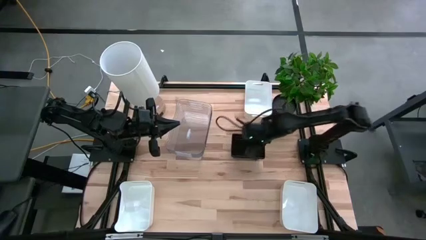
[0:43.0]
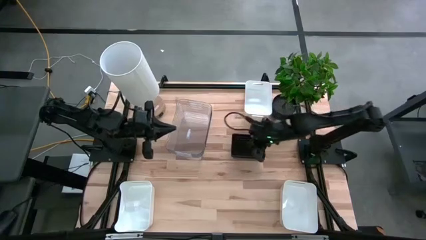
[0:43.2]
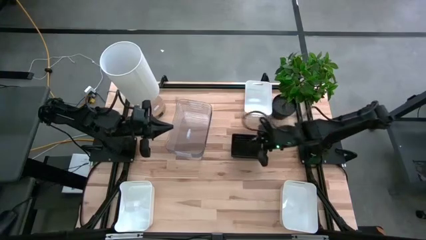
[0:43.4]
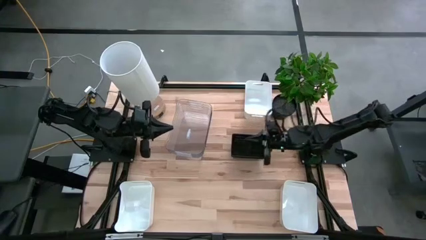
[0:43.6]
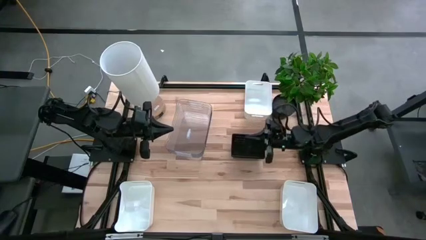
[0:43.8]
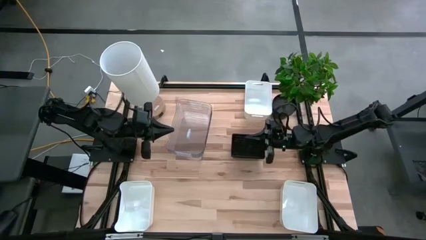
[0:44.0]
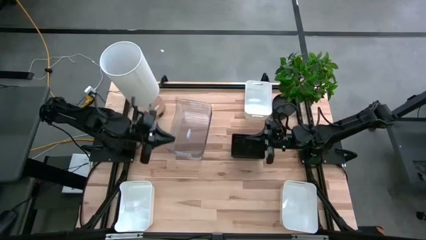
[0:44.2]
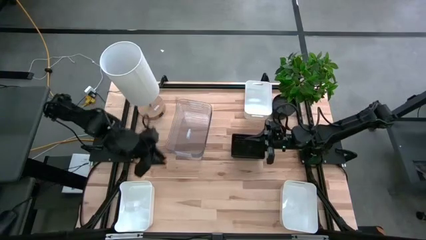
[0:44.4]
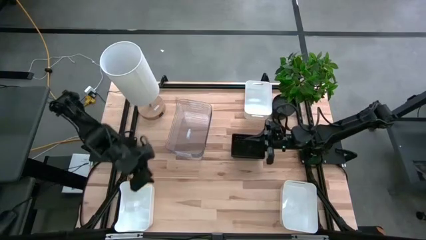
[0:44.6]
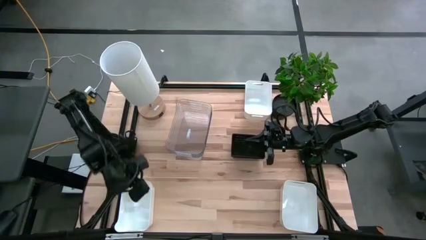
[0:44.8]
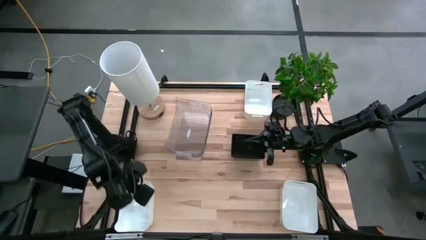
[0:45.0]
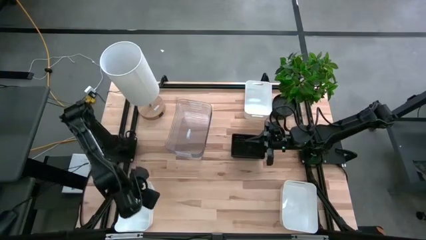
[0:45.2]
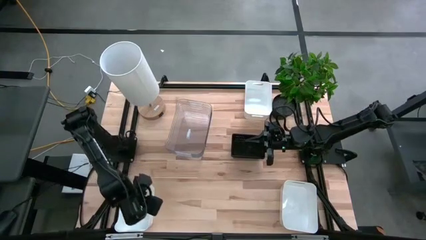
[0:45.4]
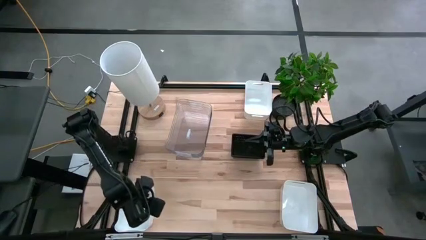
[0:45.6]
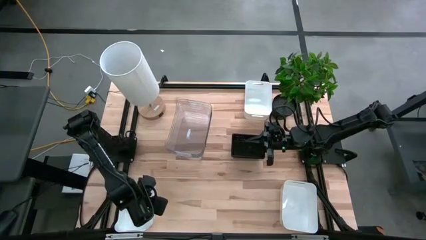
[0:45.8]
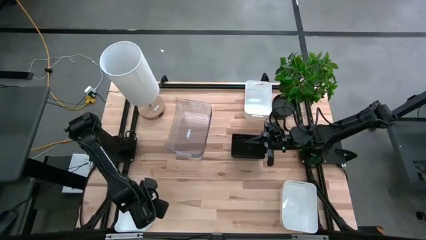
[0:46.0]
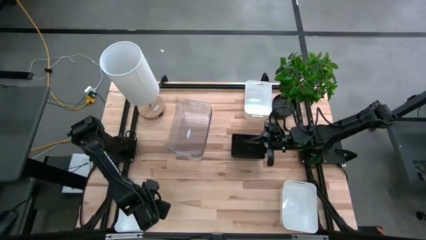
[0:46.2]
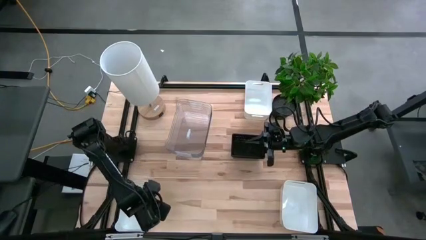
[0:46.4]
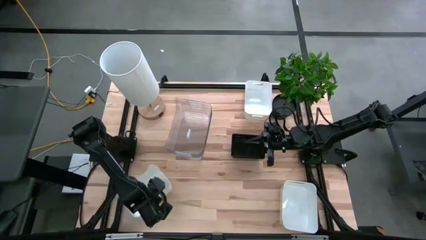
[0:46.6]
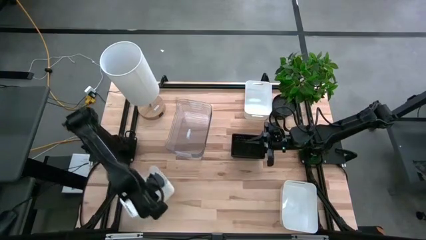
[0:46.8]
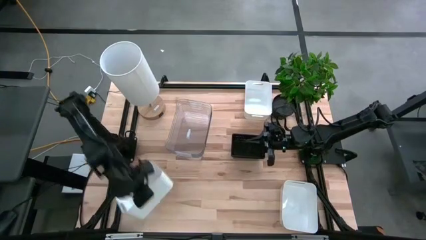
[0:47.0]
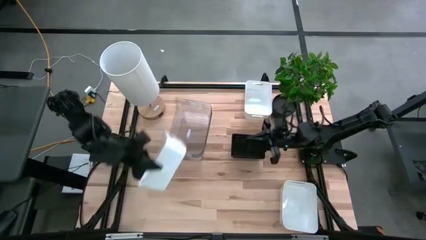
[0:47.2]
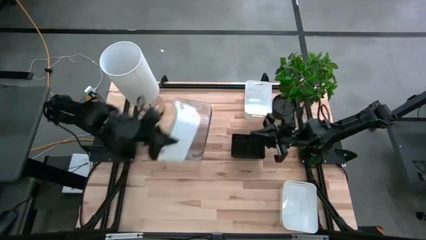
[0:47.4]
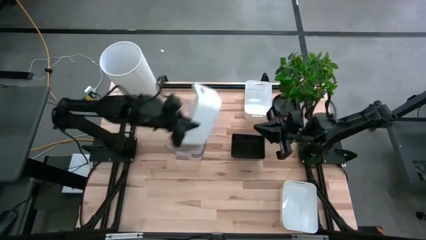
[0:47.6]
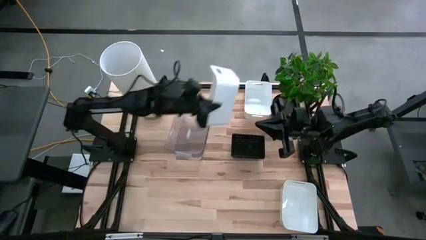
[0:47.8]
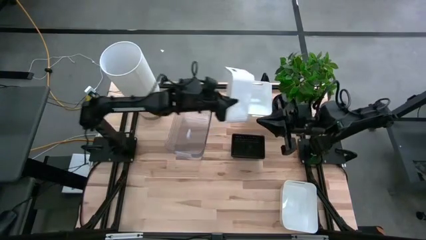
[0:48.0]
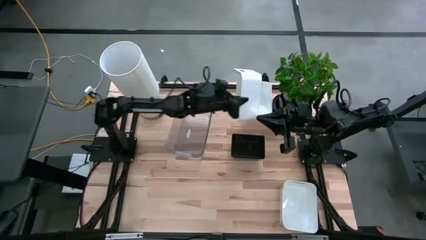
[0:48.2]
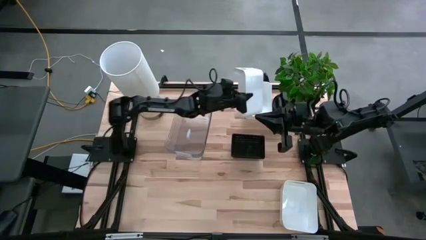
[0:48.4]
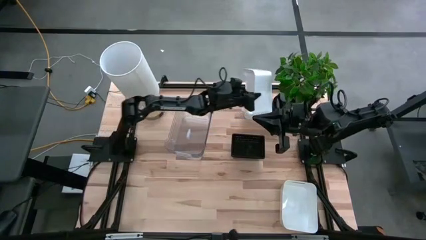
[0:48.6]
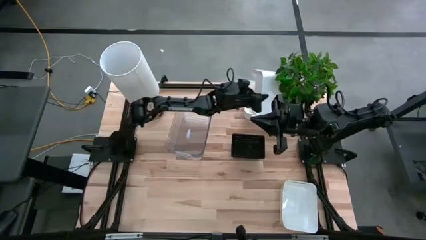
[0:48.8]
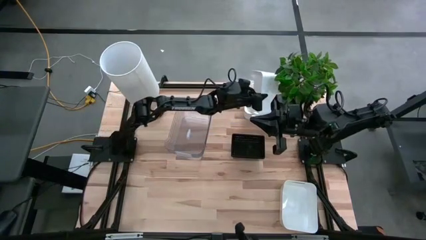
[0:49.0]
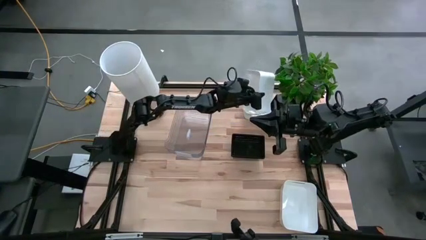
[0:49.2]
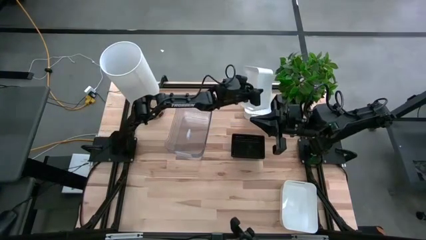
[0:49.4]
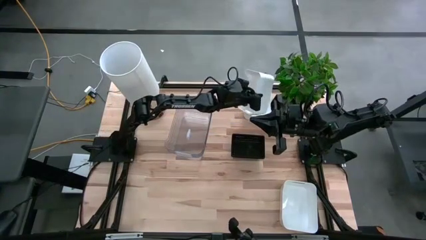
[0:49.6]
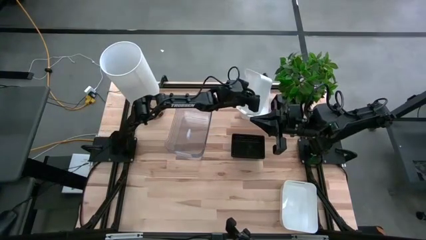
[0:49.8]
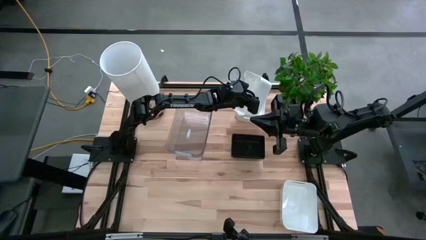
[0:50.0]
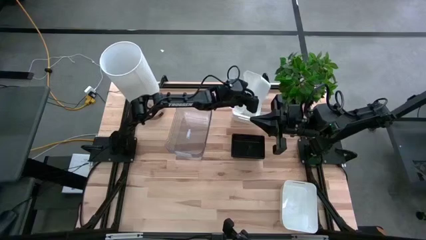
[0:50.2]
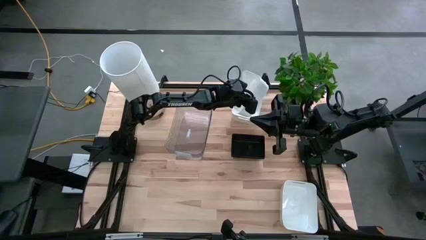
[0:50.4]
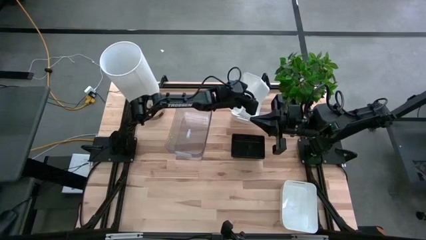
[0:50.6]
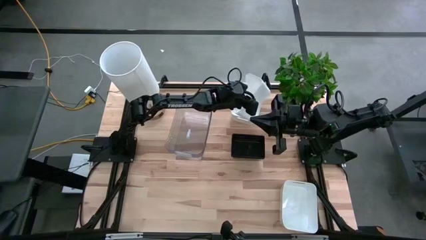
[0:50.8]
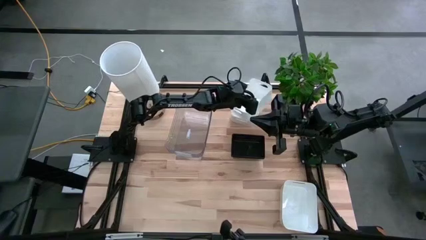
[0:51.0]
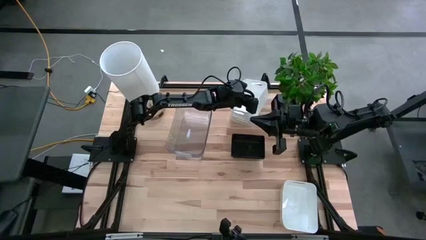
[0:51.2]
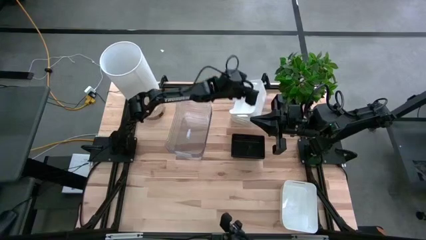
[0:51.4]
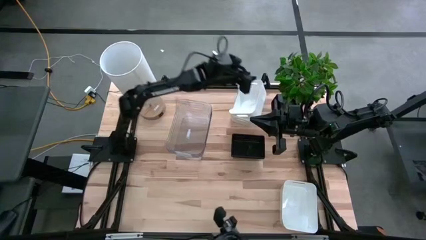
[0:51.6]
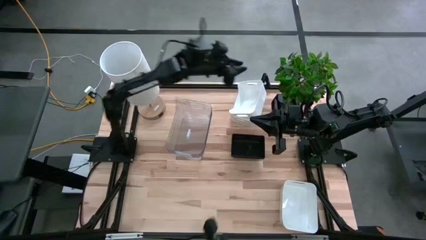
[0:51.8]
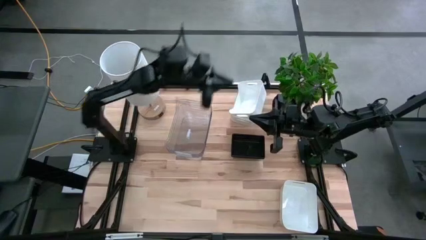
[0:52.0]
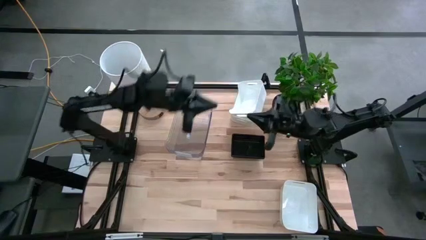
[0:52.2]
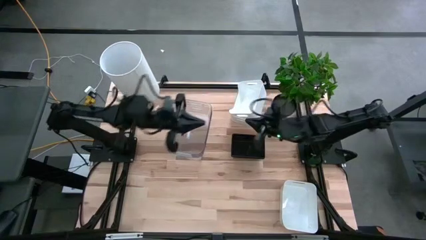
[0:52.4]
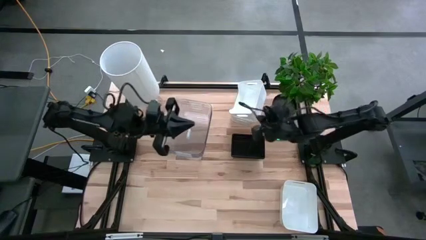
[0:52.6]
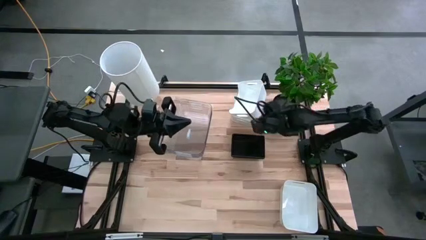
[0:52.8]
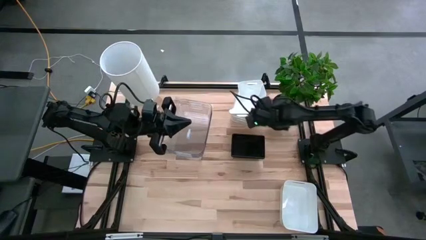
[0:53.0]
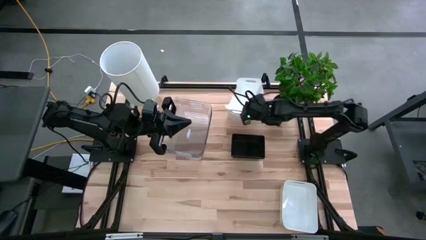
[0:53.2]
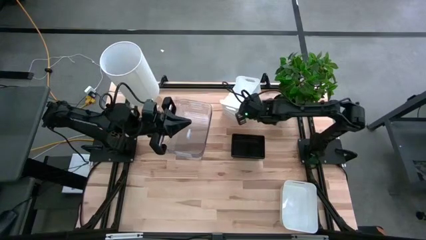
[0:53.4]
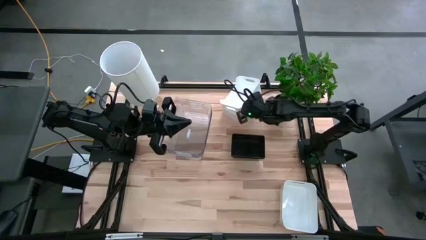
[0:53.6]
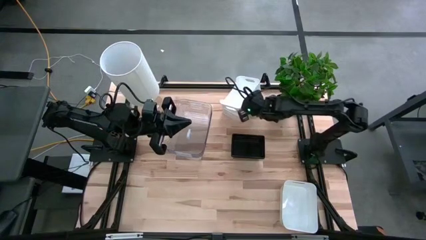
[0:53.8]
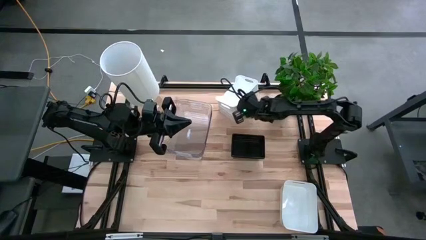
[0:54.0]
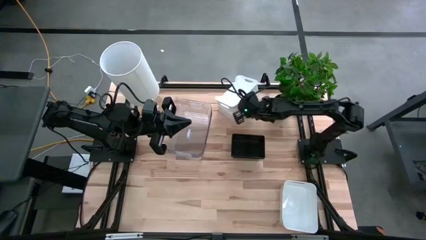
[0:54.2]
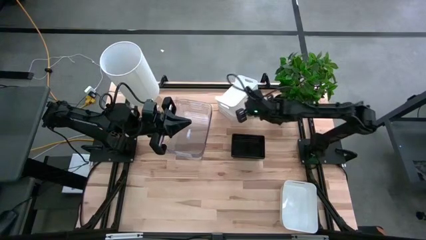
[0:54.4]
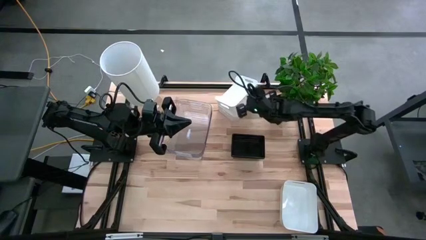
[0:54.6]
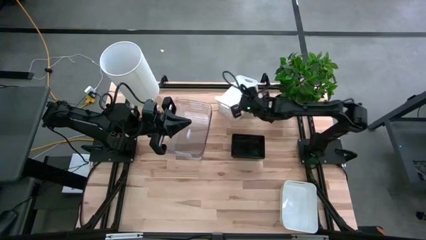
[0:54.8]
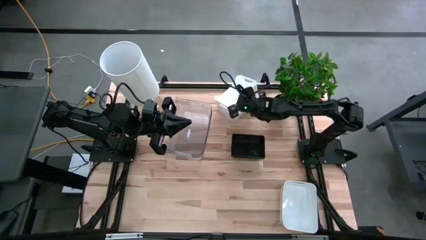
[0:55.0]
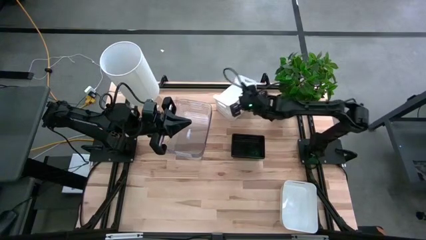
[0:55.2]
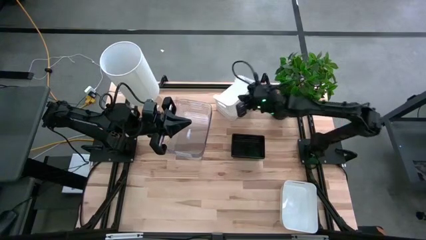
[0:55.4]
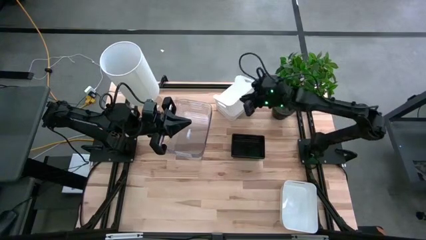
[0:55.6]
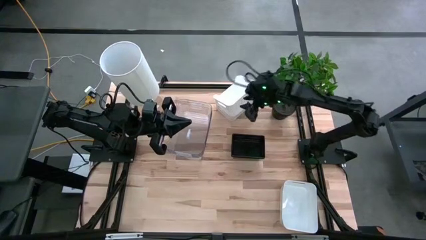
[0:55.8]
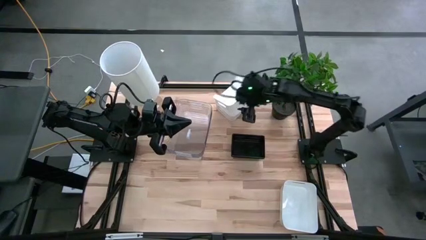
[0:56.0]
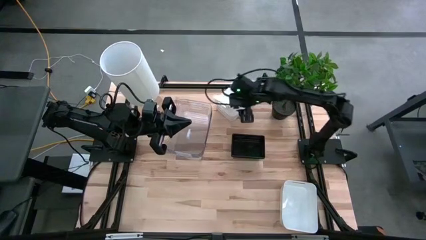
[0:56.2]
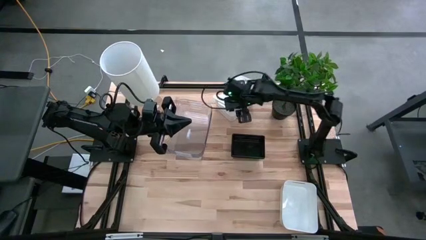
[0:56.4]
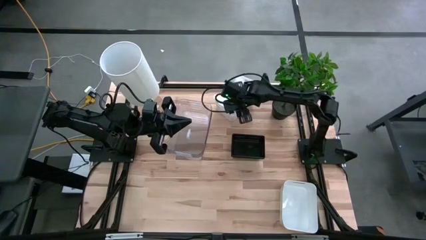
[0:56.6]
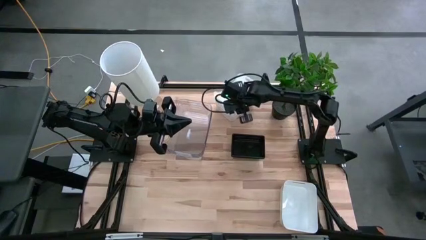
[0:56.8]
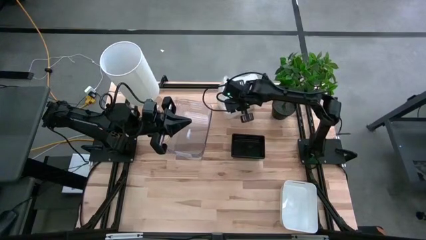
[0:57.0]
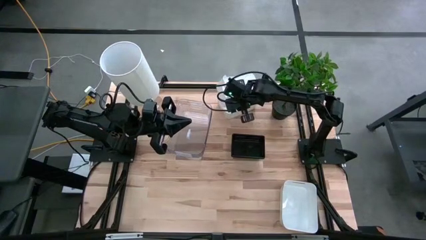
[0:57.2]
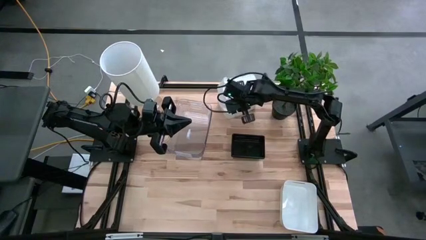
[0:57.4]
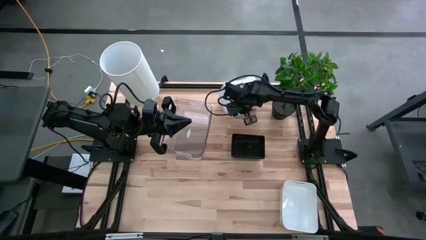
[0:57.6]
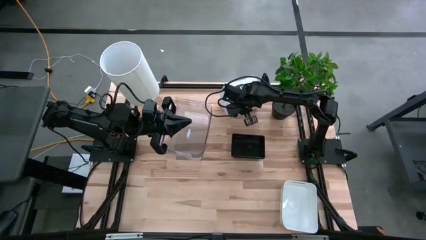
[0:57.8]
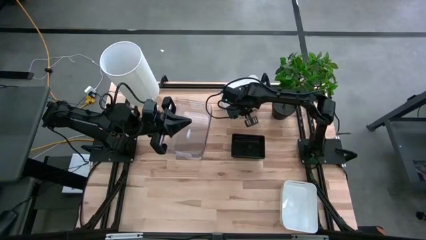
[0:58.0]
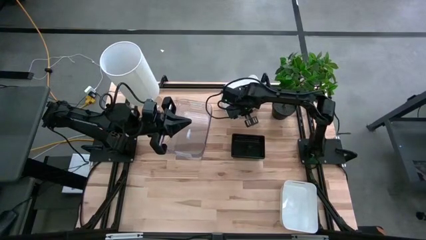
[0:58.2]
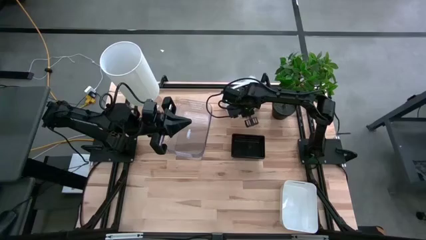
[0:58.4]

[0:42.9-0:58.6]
Stack the left white bin on top of the top white bin
